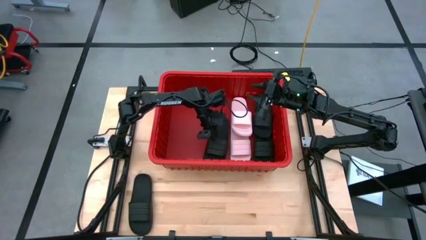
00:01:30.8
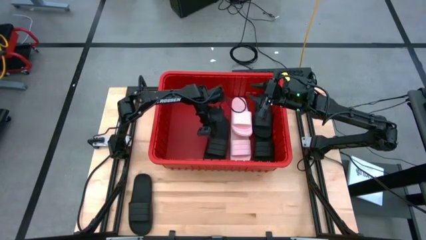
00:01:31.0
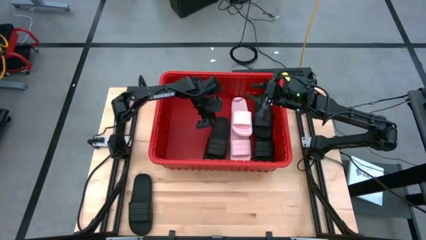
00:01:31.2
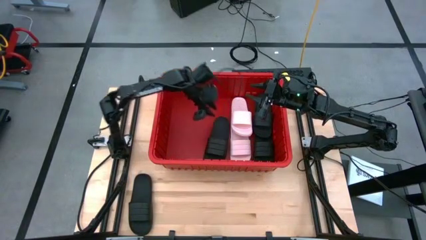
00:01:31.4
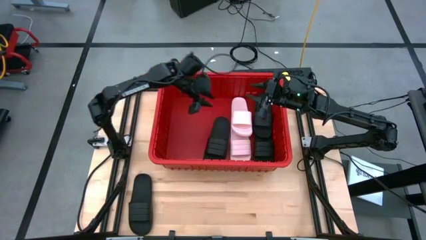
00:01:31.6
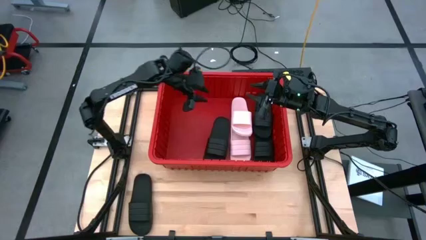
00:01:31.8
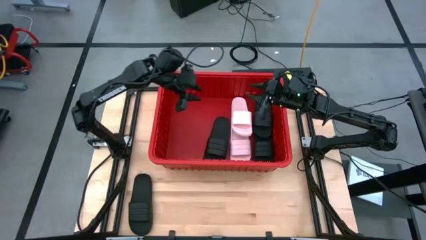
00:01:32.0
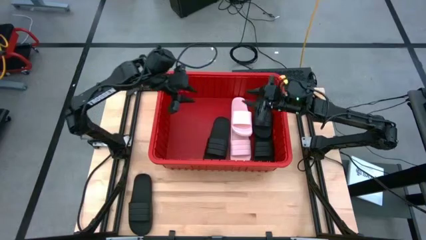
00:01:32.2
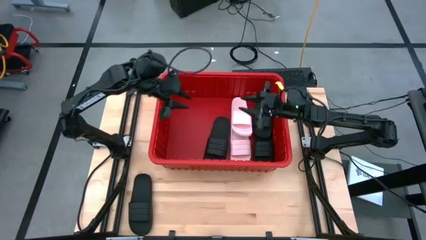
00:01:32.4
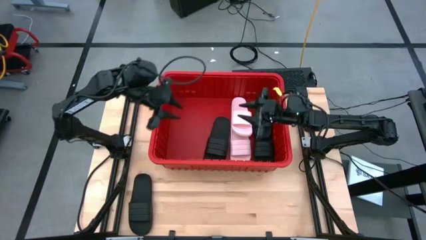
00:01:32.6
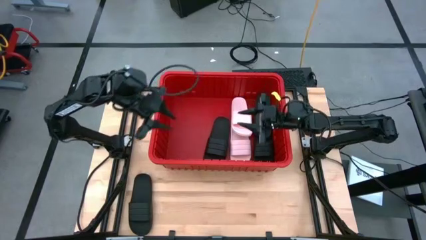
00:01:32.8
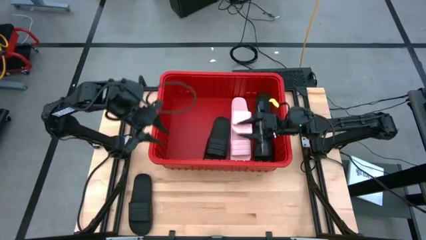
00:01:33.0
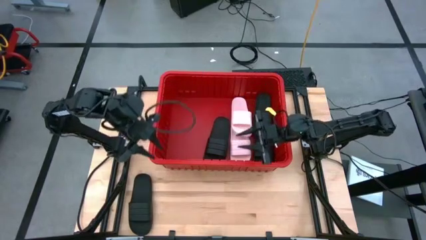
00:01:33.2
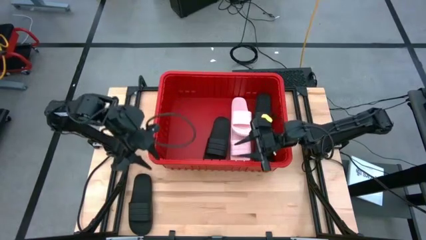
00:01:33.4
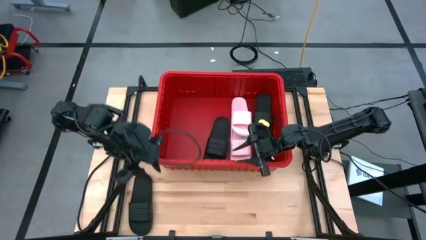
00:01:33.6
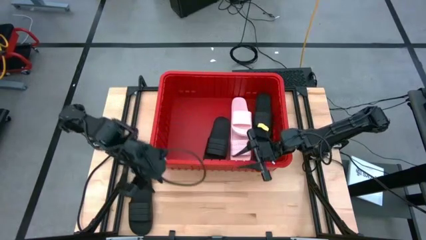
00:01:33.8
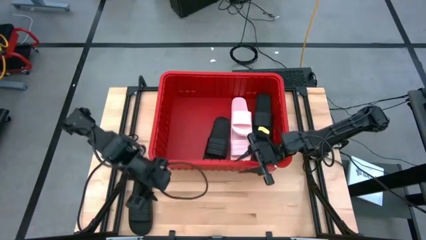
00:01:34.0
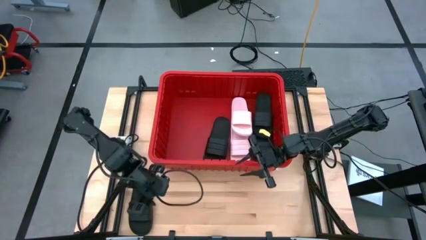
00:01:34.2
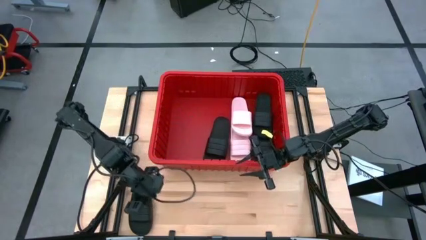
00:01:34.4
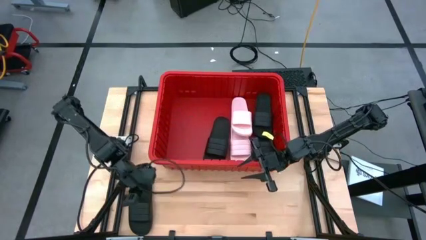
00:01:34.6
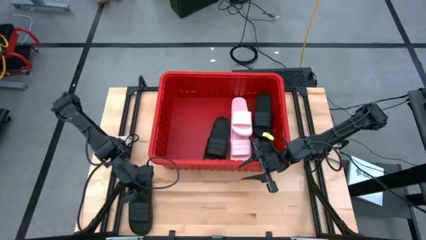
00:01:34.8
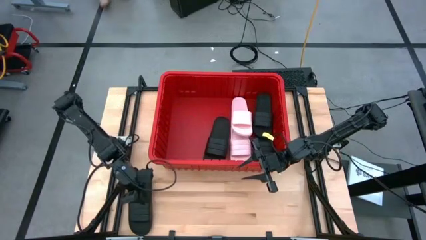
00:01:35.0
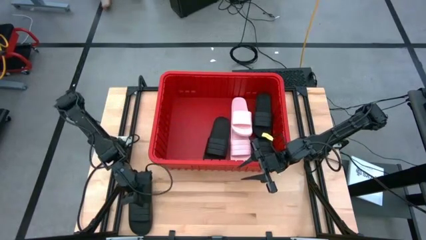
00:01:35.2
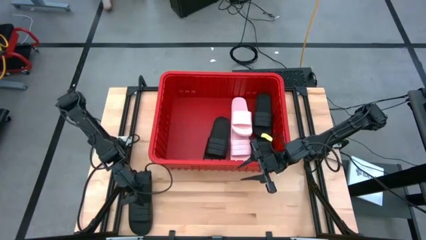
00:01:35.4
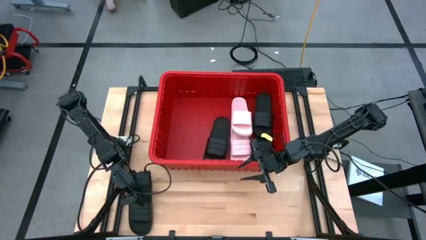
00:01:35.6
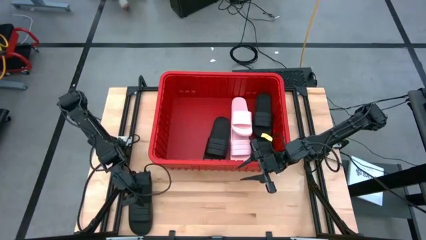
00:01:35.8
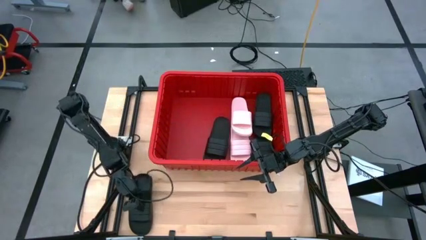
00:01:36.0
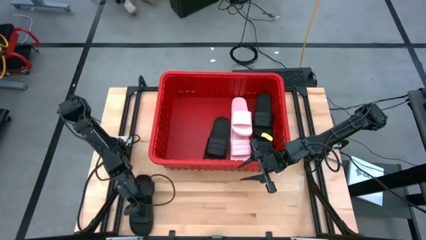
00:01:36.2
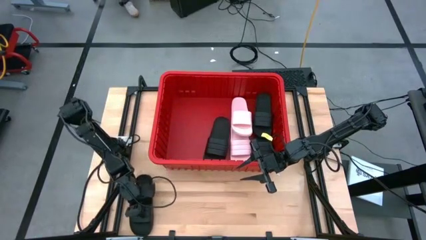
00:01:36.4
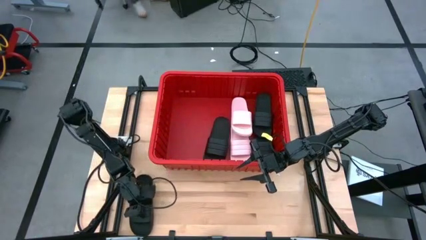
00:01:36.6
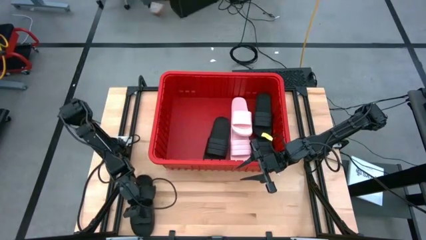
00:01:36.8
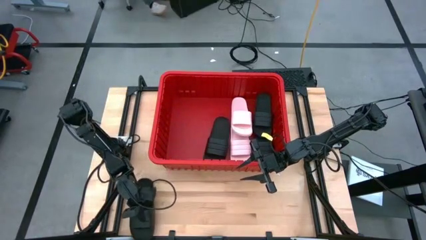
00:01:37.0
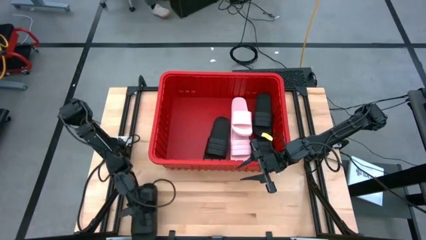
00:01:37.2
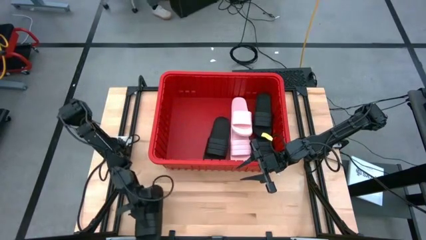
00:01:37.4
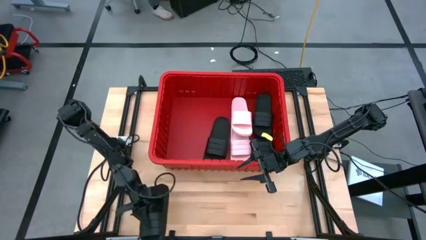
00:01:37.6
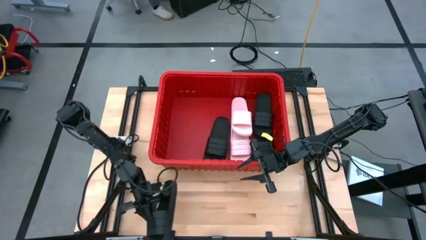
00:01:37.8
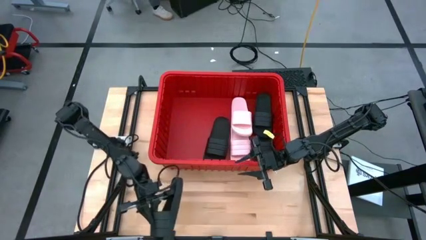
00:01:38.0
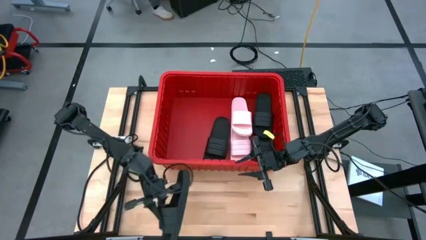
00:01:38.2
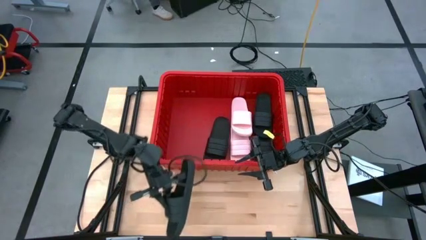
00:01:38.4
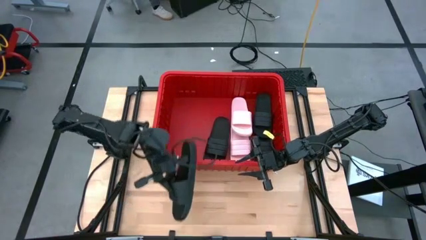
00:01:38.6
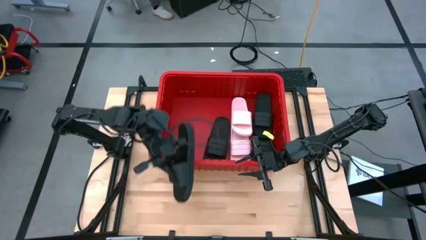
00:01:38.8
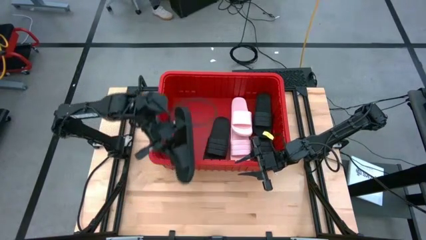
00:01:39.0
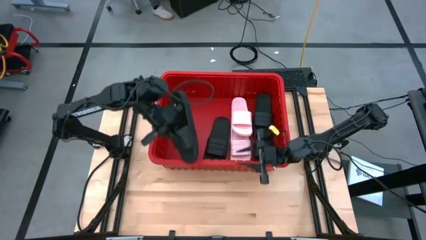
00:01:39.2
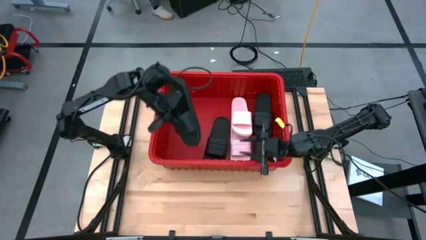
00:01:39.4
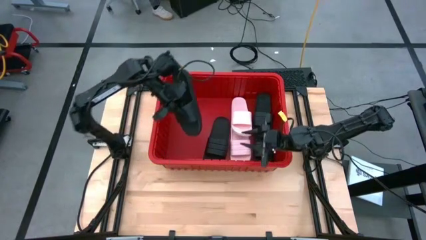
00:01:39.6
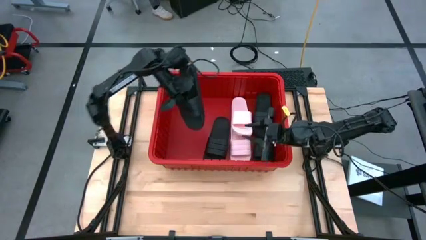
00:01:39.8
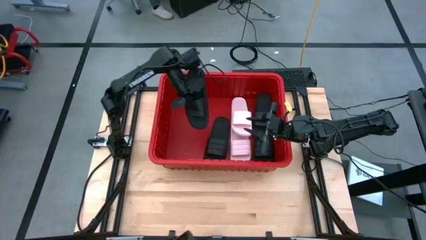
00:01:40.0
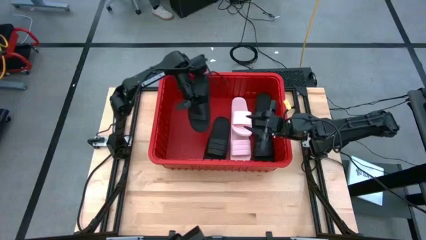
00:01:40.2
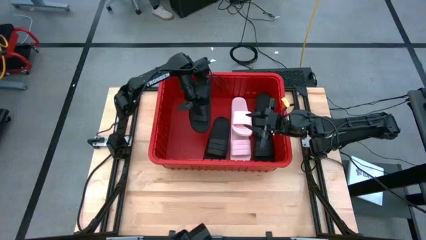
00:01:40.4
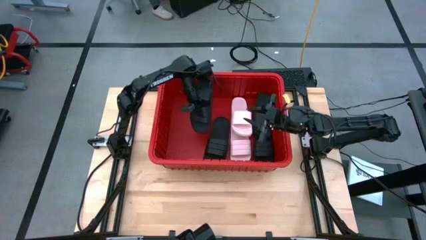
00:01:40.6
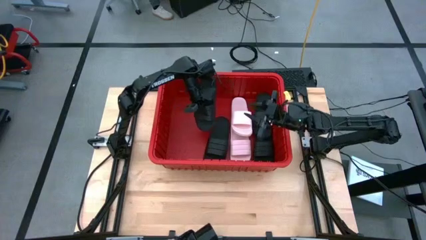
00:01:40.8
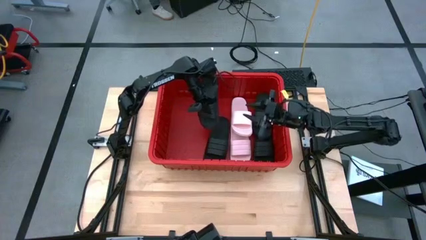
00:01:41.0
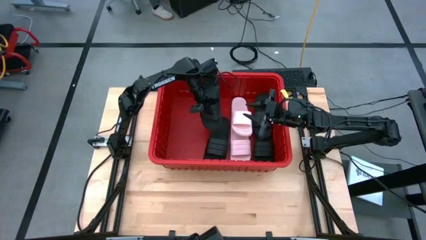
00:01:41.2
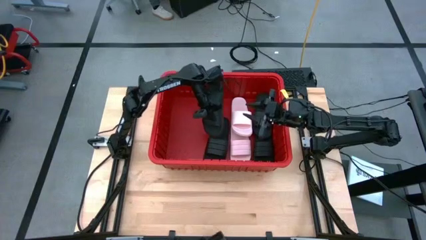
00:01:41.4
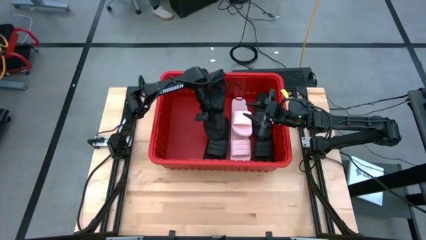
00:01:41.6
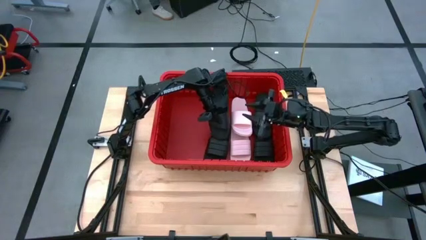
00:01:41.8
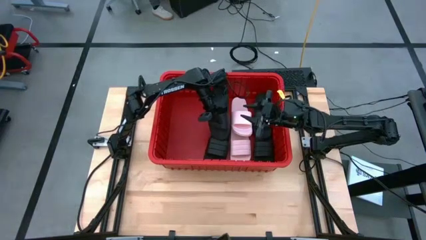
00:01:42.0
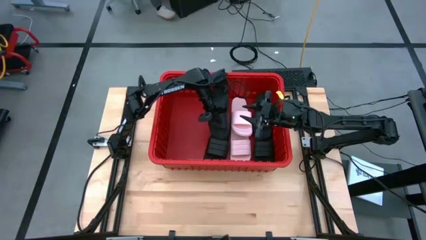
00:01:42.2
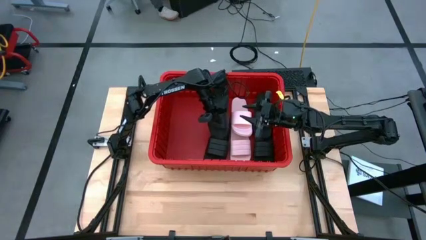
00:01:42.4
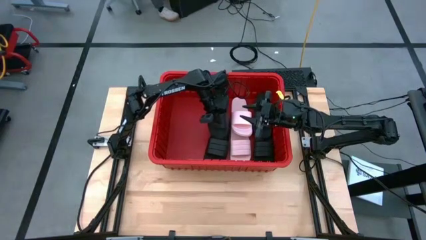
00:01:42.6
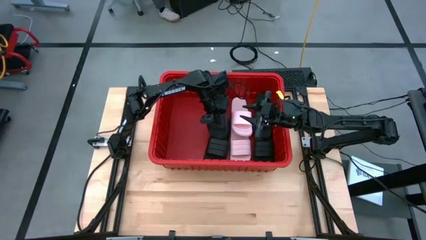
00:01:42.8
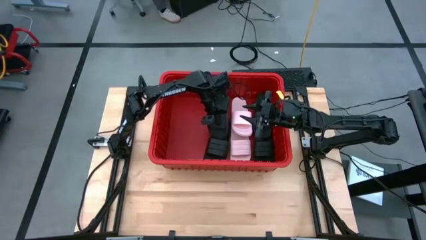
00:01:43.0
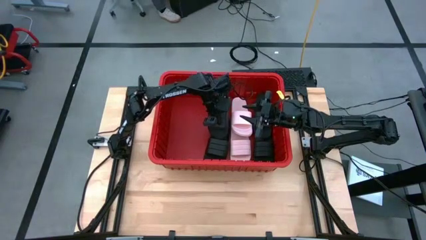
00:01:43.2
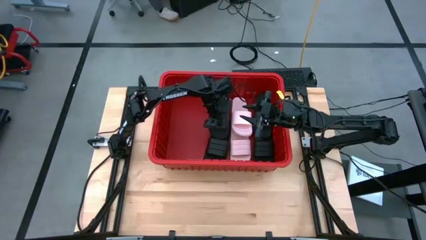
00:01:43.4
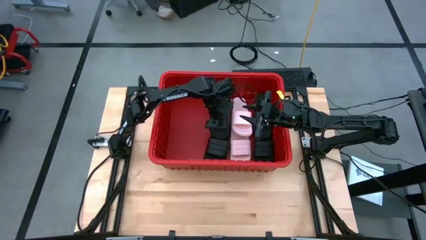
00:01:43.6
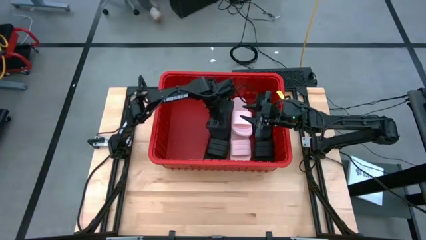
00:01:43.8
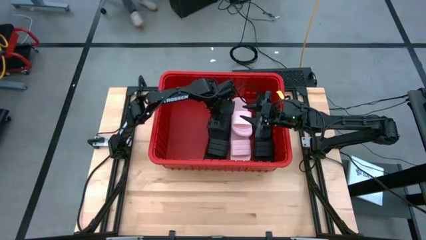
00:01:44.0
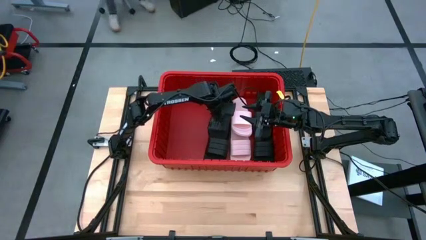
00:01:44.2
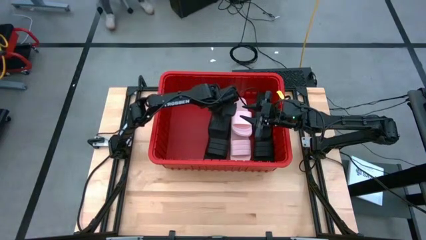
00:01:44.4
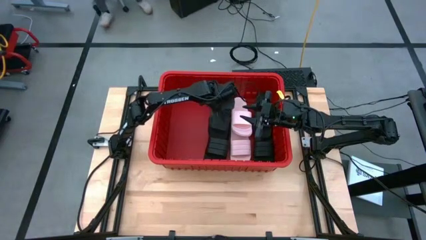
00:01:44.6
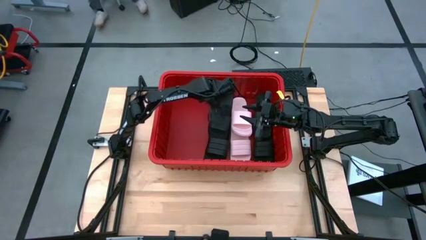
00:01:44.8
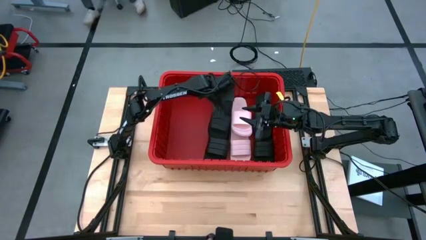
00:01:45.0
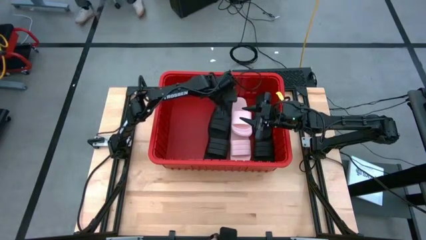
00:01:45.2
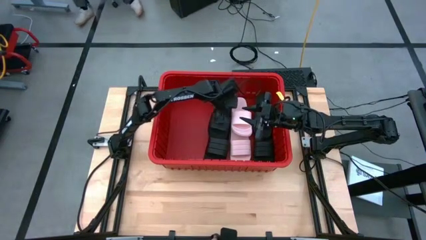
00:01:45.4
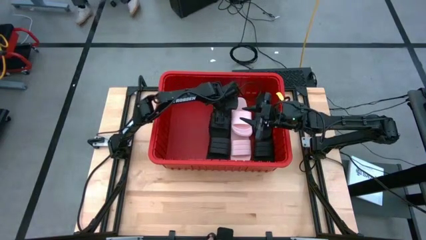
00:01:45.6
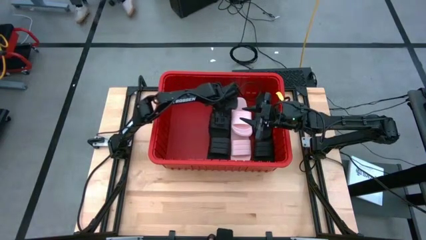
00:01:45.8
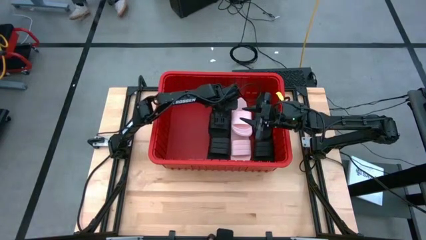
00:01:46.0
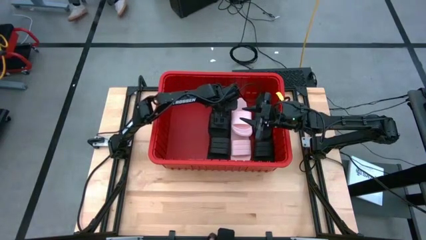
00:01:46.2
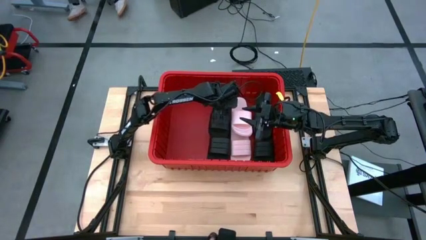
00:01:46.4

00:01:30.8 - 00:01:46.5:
Task: Pick and place slides into bin
Put the black slide into the red container

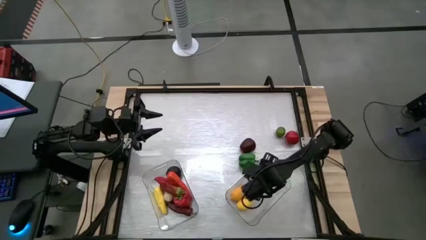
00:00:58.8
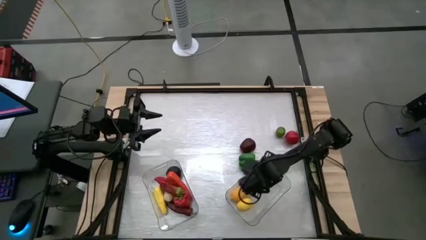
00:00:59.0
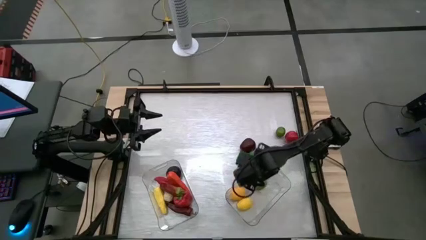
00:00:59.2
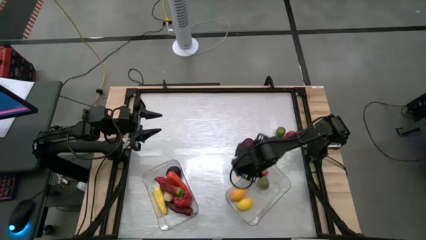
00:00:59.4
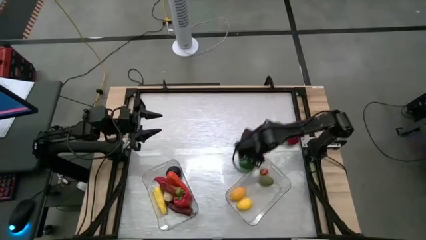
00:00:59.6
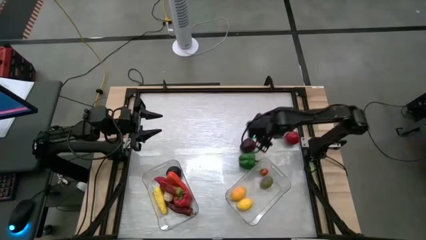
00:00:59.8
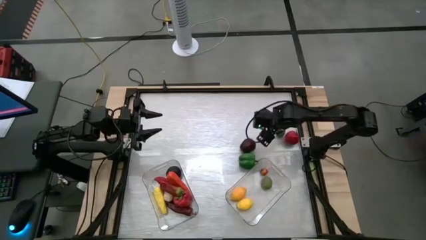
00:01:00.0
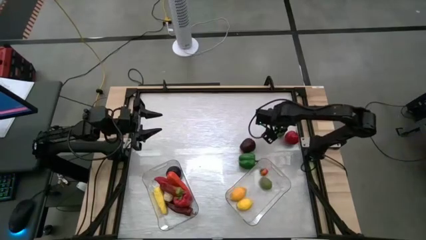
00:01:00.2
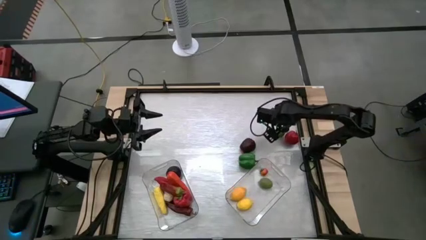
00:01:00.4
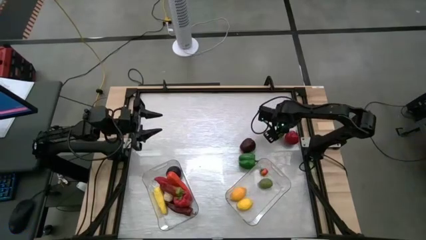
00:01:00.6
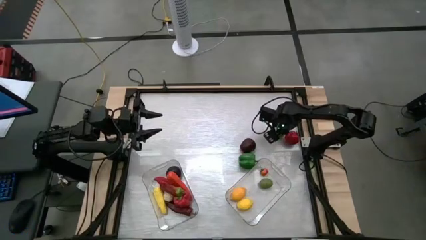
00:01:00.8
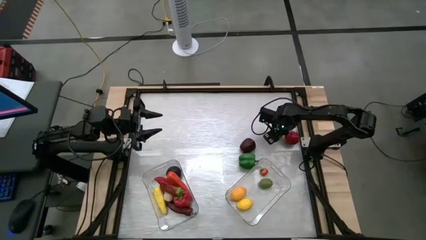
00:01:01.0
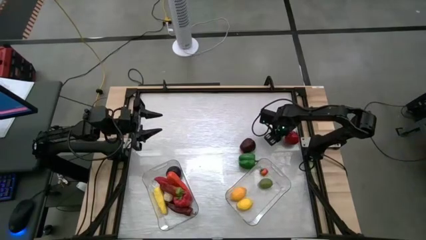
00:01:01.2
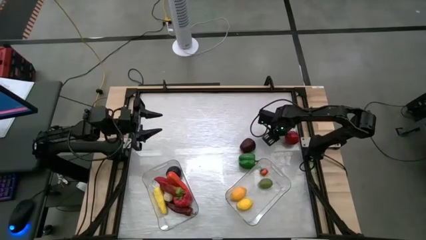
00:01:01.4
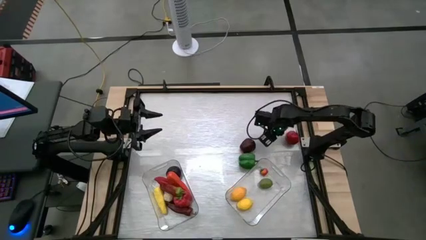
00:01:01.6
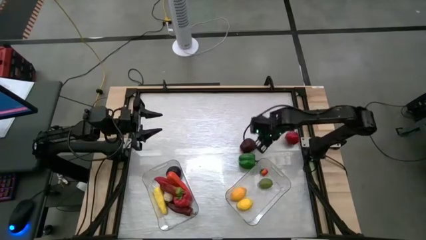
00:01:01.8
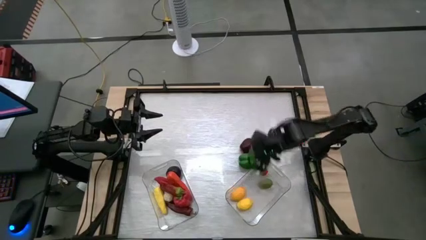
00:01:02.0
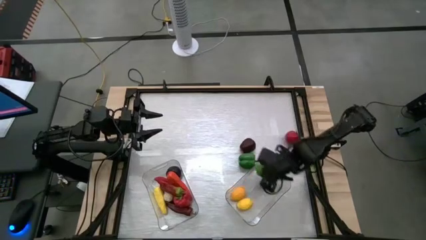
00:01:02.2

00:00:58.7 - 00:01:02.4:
Task: Sort produce into baskets
Put the lemon into the right transparent bin
